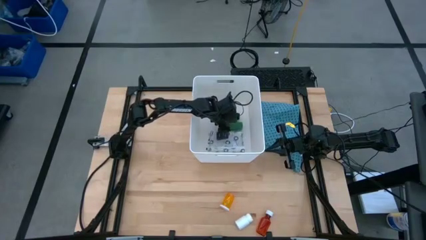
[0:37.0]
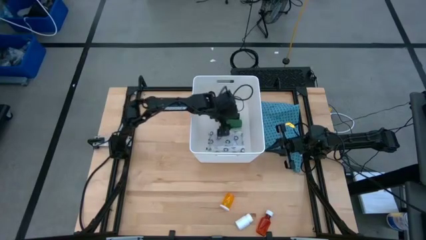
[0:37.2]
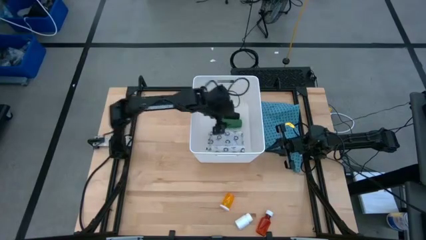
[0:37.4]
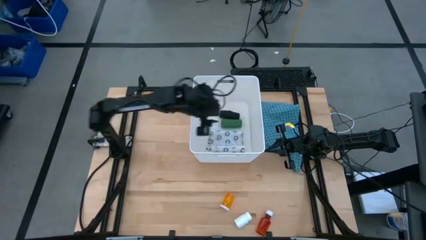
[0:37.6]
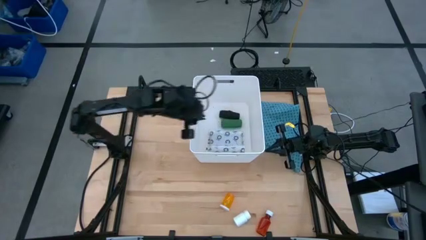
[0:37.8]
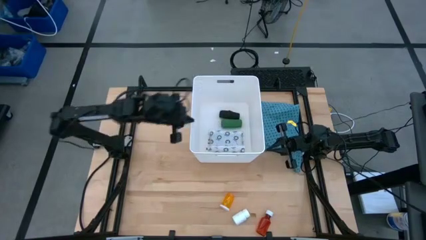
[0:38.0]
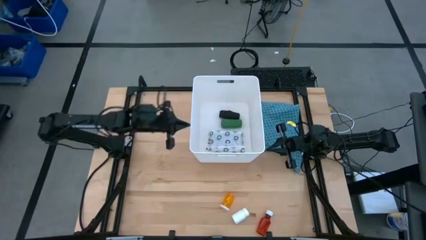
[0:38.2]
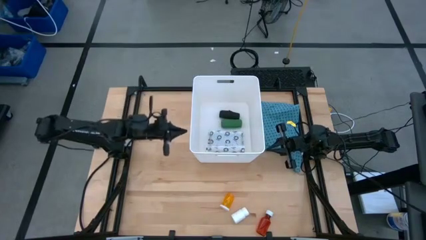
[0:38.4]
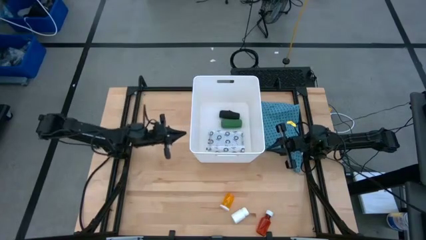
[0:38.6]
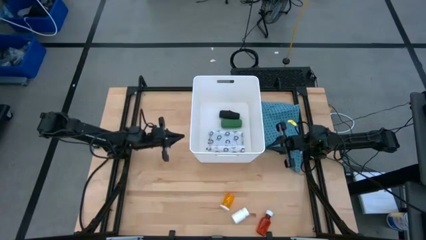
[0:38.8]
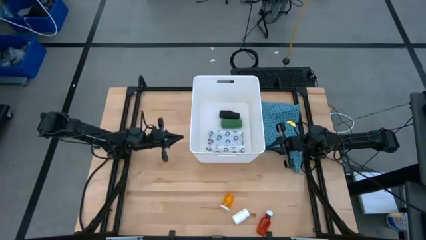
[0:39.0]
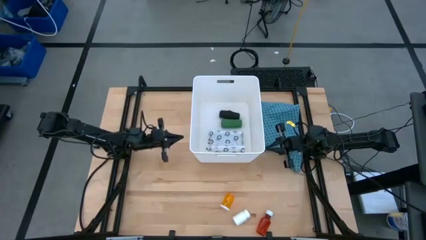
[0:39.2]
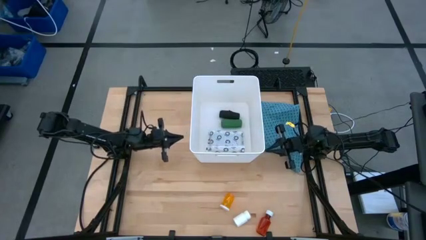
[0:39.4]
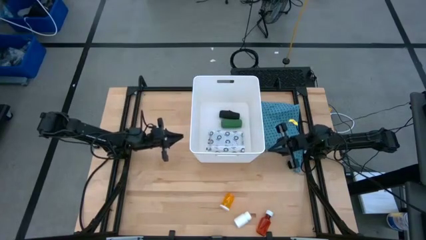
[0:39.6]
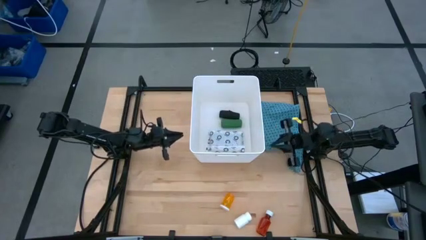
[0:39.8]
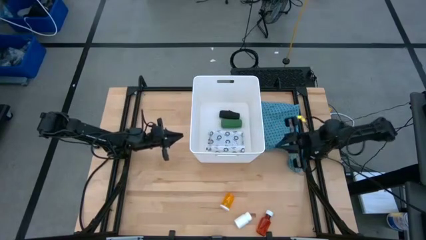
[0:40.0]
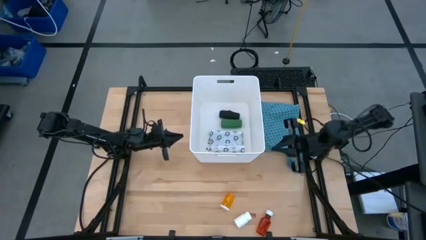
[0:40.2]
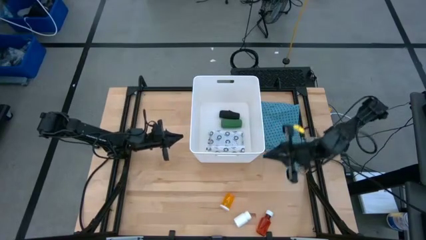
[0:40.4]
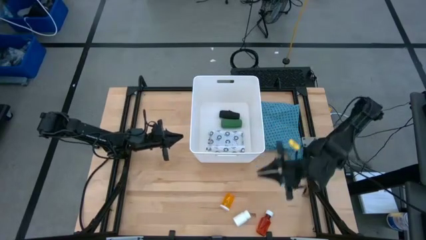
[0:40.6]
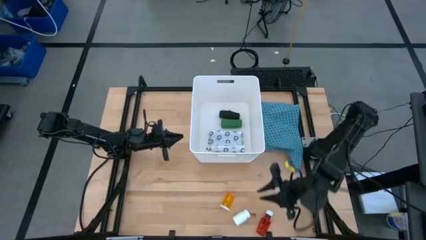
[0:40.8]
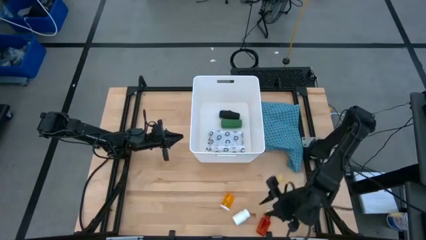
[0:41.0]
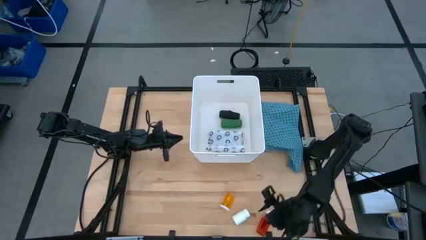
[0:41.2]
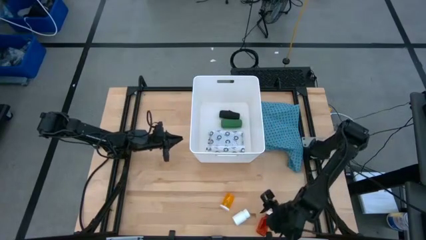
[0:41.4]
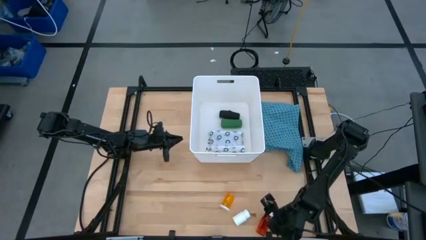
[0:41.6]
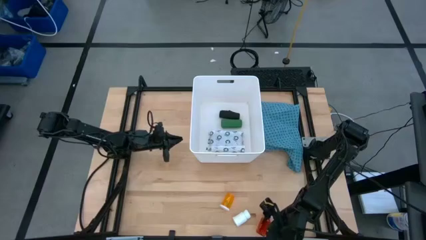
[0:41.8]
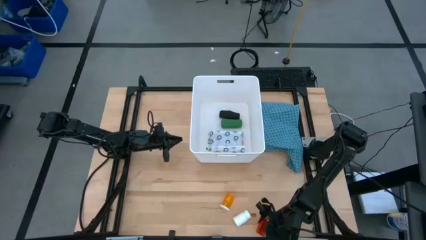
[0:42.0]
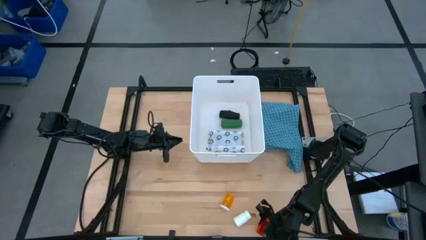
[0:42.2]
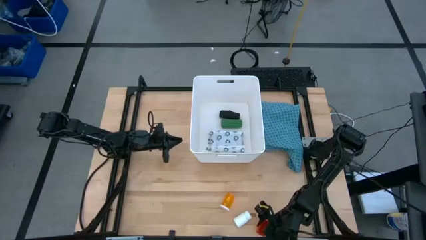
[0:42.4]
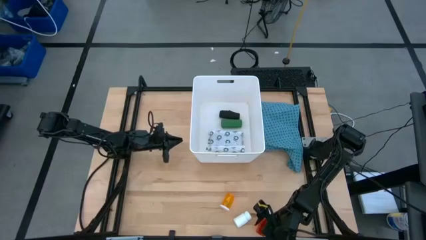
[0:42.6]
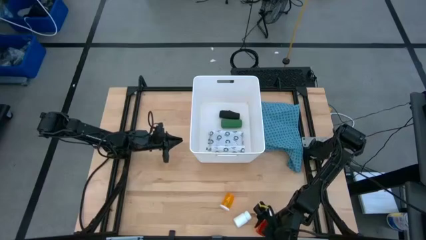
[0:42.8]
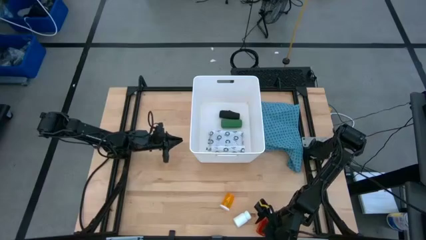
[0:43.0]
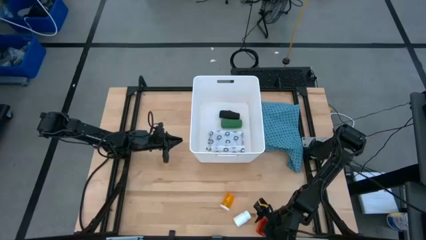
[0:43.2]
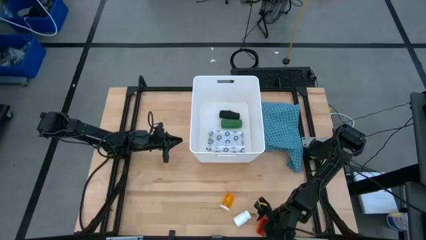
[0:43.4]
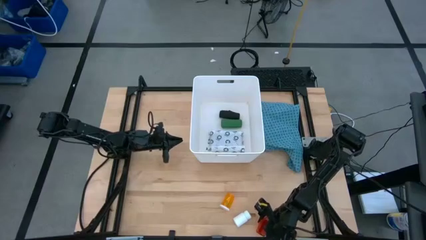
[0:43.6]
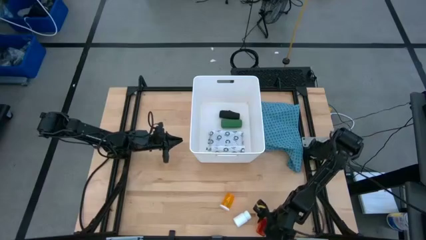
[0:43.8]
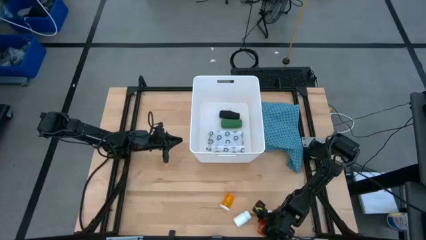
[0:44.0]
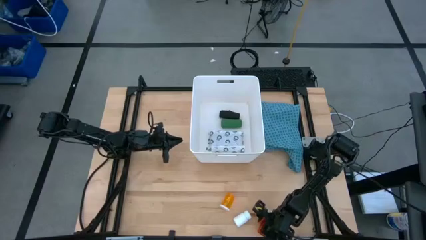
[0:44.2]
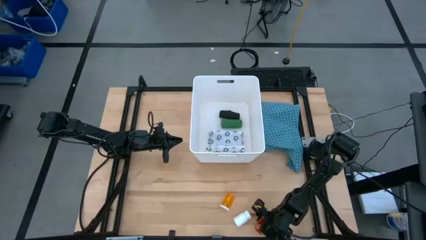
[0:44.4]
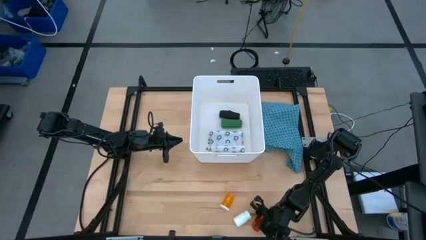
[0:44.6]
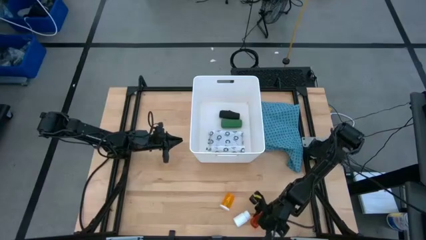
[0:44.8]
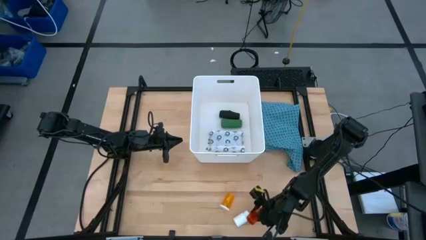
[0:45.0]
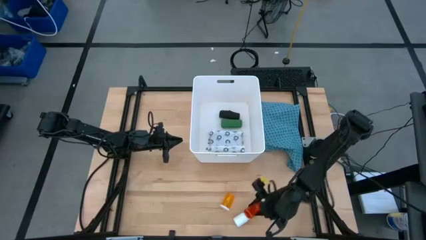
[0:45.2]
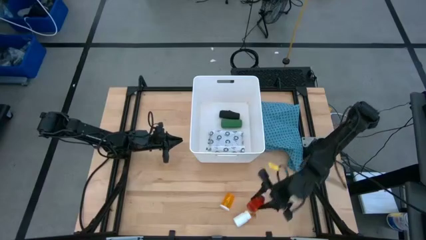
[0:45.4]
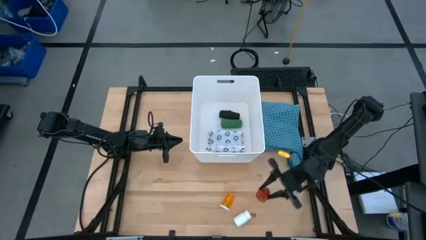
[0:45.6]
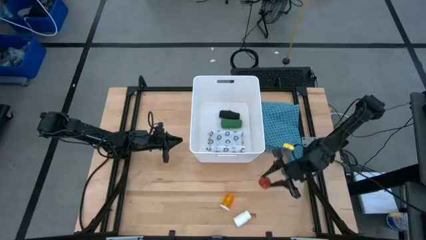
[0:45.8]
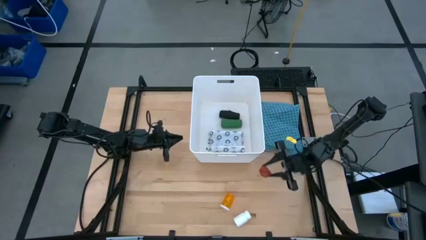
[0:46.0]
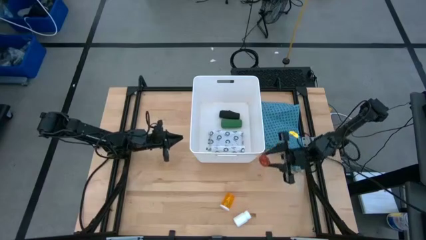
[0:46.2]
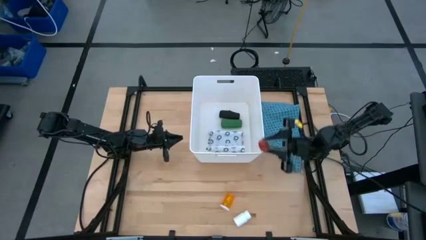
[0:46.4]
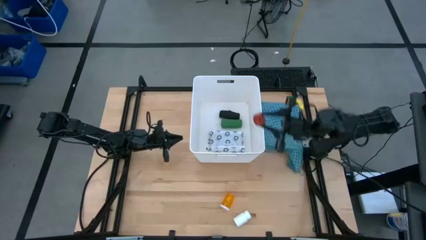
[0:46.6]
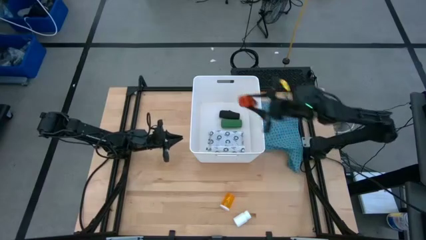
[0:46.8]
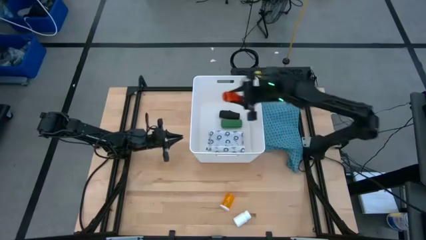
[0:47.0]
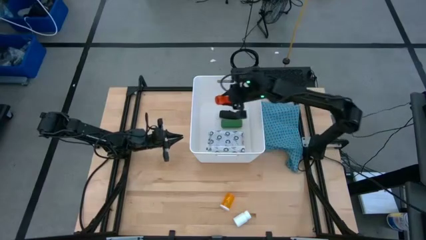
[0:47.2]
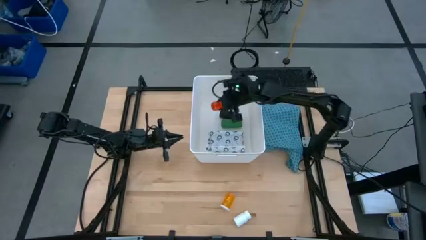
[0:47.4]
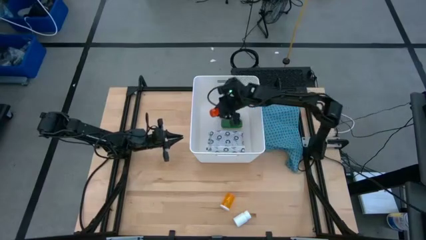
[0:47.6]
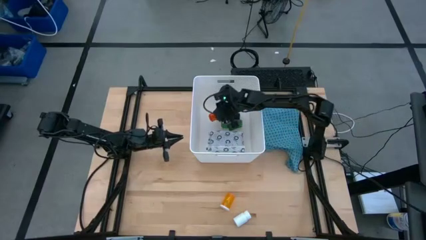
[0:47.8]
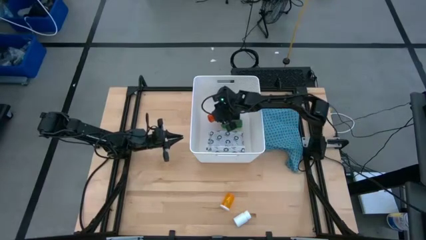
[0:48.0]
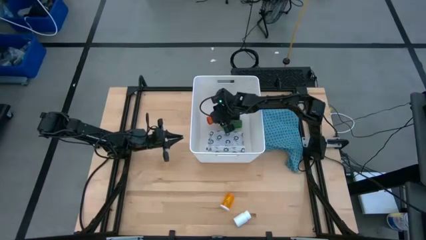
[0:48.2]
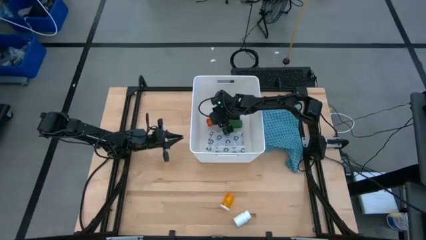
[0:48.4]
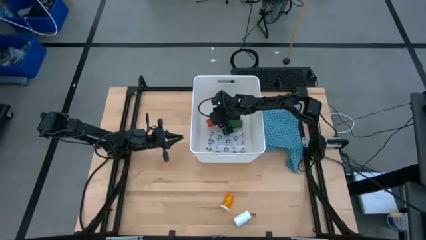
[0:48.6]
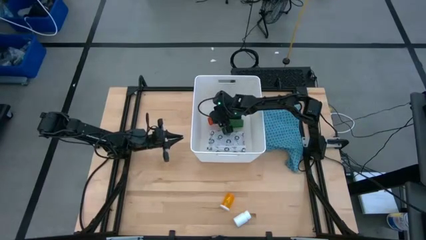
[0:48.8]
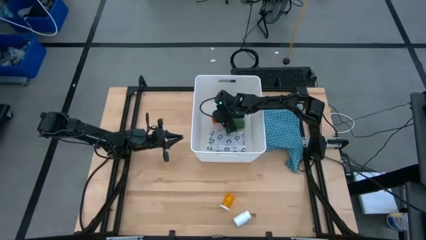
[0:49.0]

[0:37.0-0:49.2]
Task: Pick & place medical supplies in basket/bin
Put the red medicine bottle into the white bin
